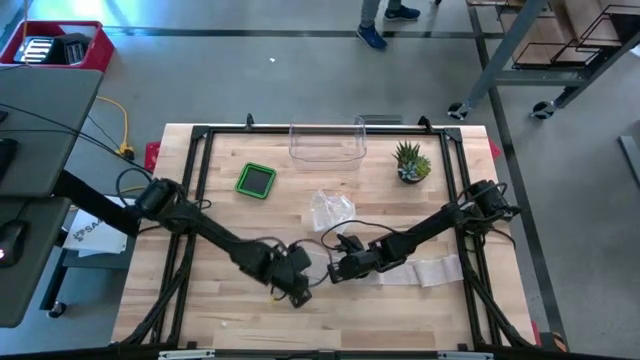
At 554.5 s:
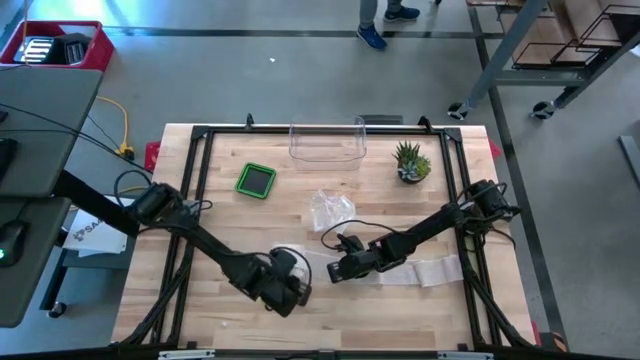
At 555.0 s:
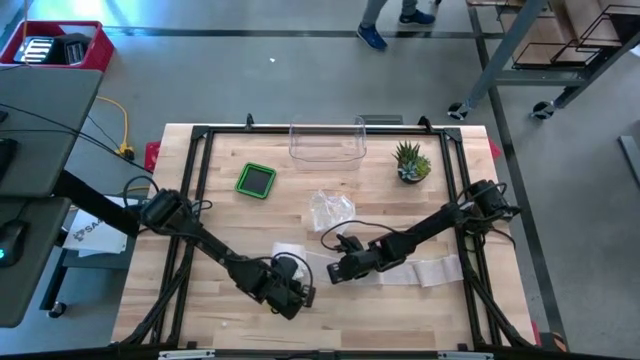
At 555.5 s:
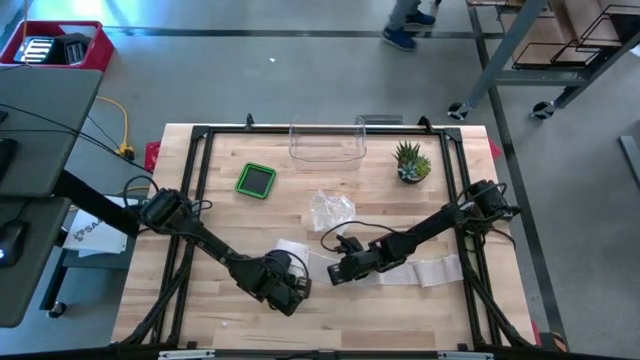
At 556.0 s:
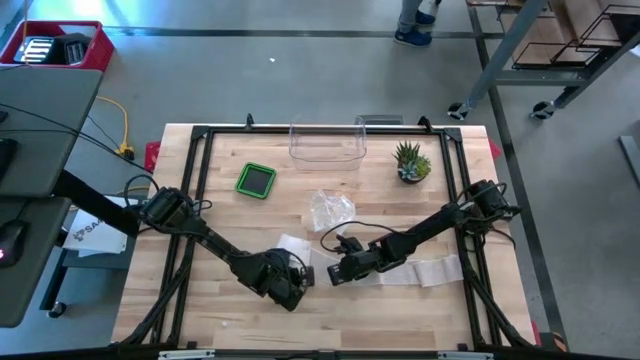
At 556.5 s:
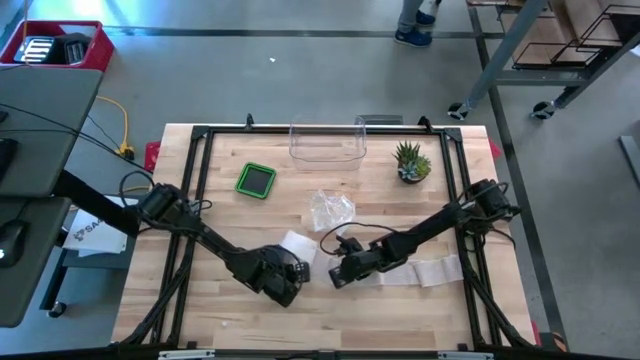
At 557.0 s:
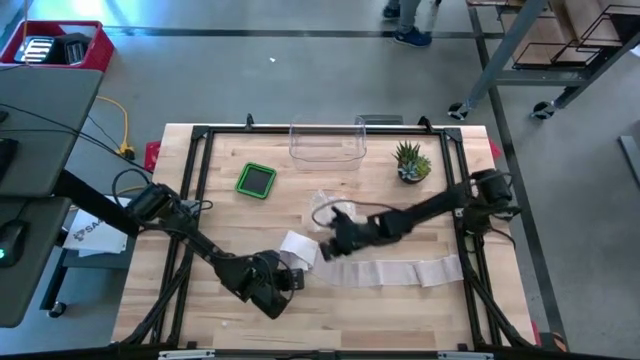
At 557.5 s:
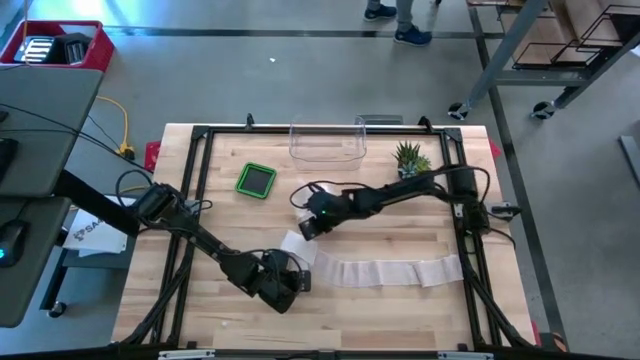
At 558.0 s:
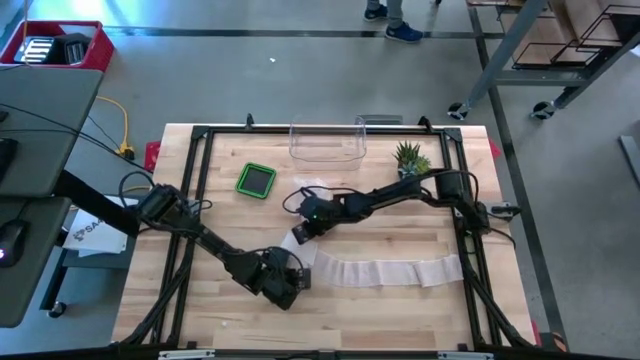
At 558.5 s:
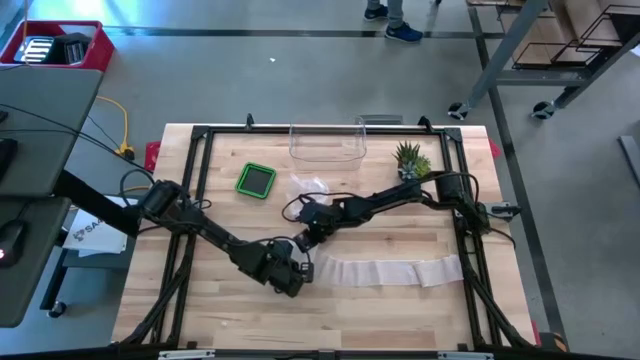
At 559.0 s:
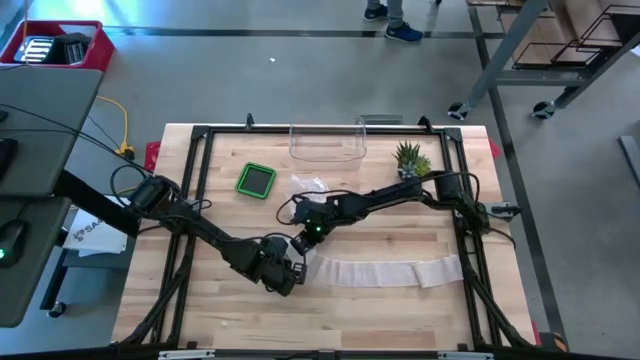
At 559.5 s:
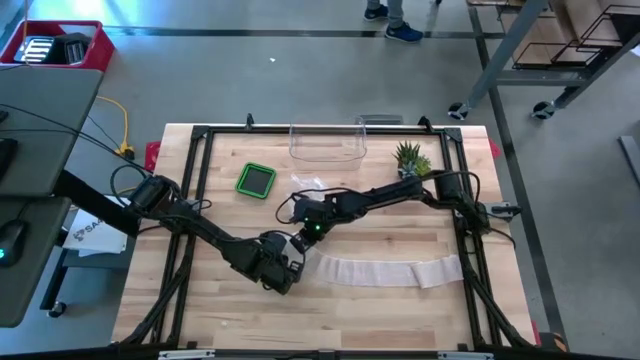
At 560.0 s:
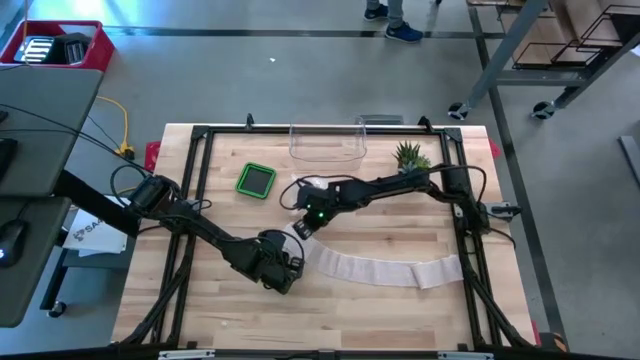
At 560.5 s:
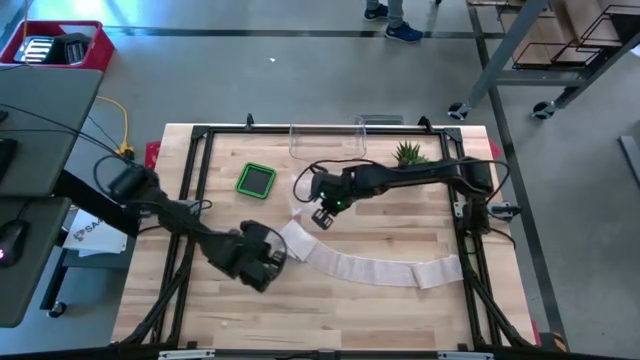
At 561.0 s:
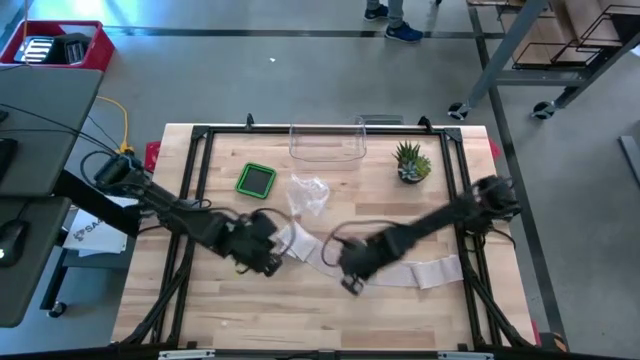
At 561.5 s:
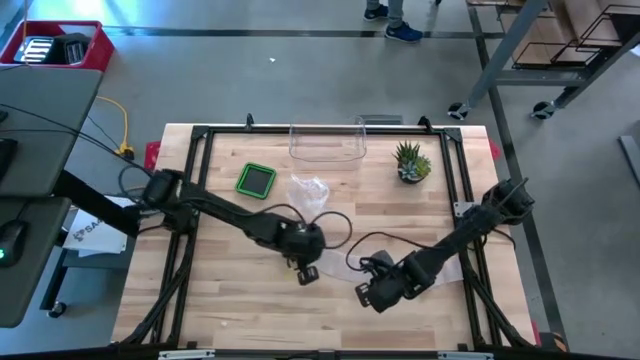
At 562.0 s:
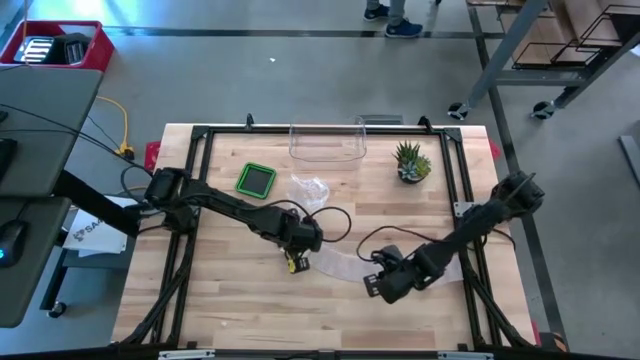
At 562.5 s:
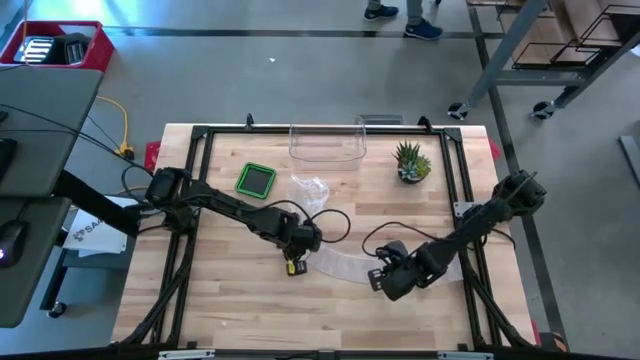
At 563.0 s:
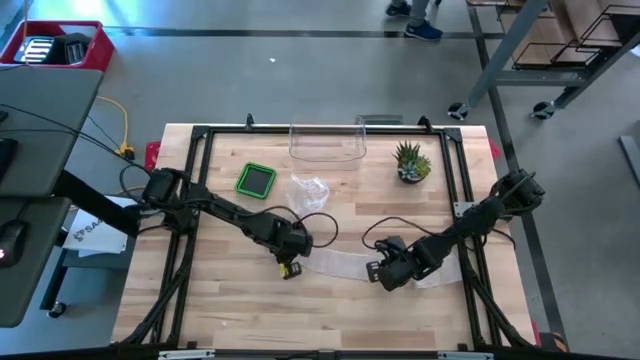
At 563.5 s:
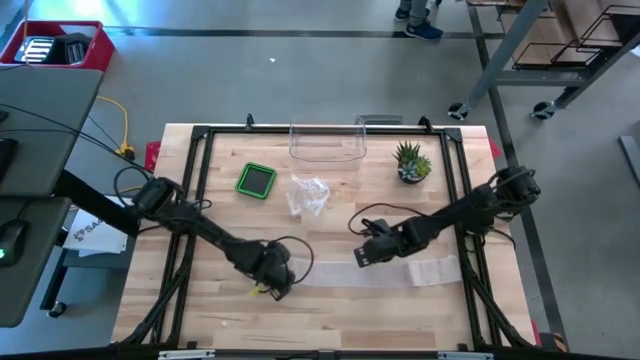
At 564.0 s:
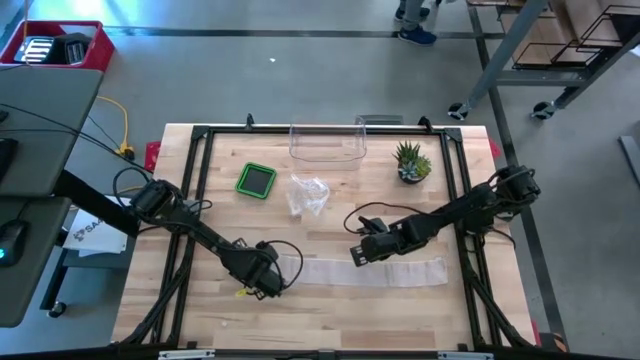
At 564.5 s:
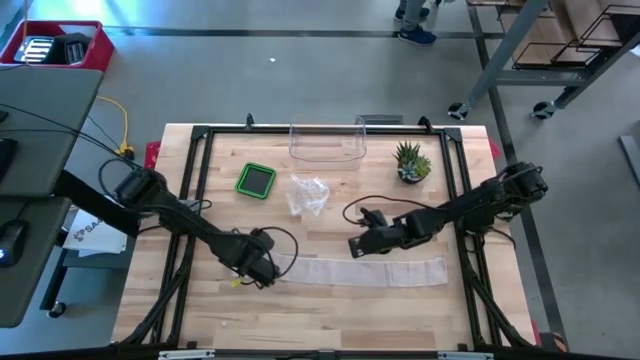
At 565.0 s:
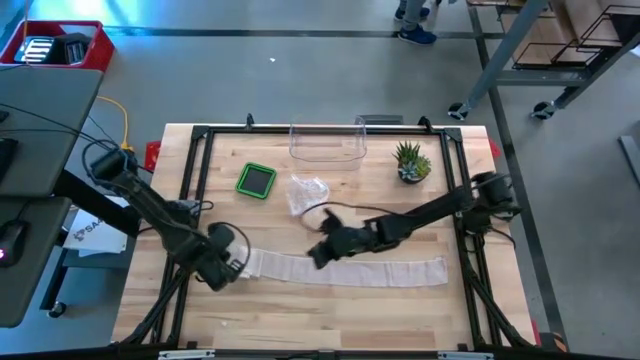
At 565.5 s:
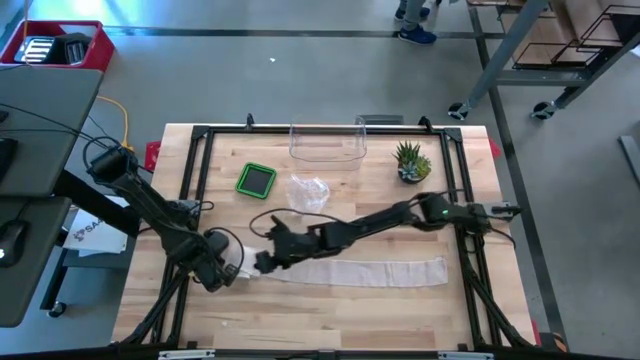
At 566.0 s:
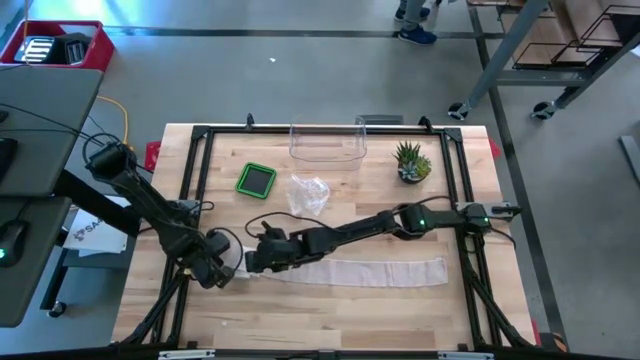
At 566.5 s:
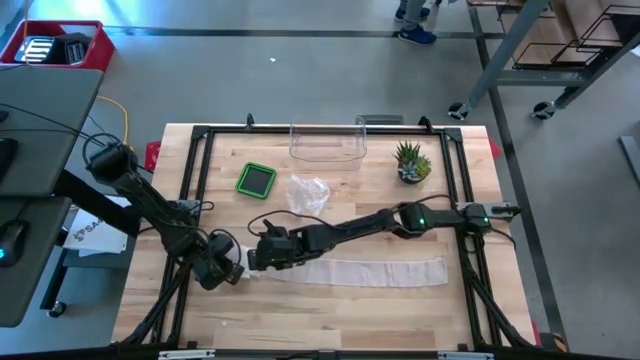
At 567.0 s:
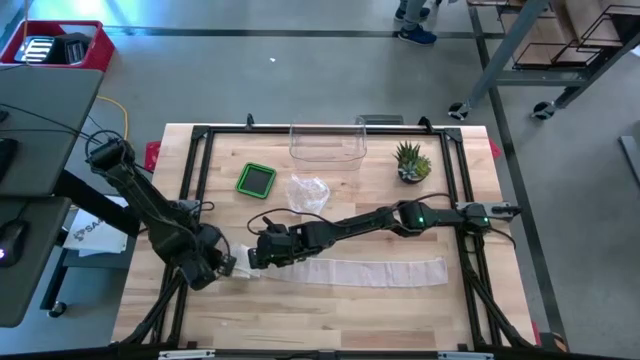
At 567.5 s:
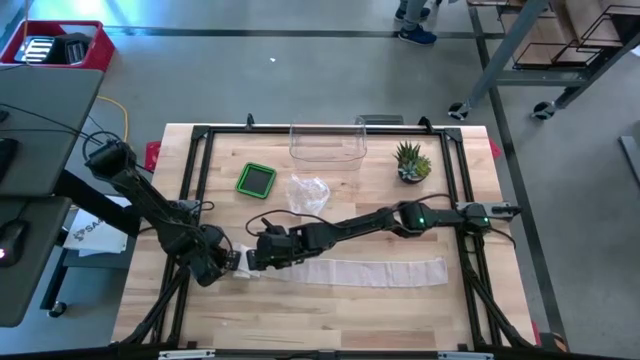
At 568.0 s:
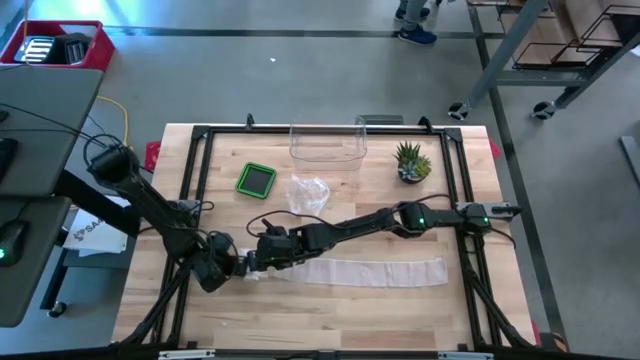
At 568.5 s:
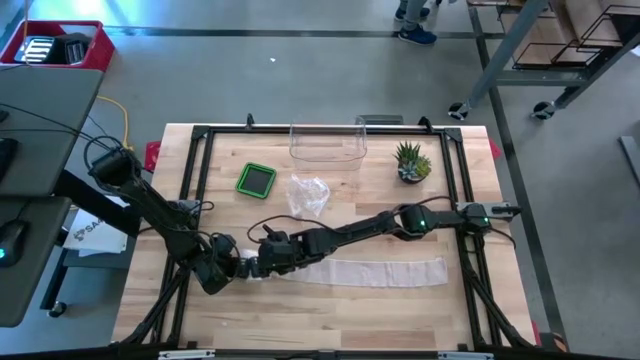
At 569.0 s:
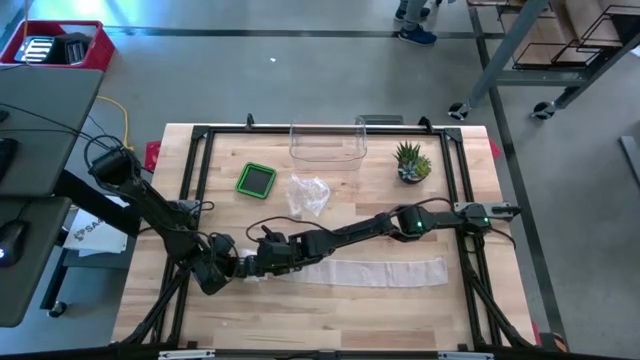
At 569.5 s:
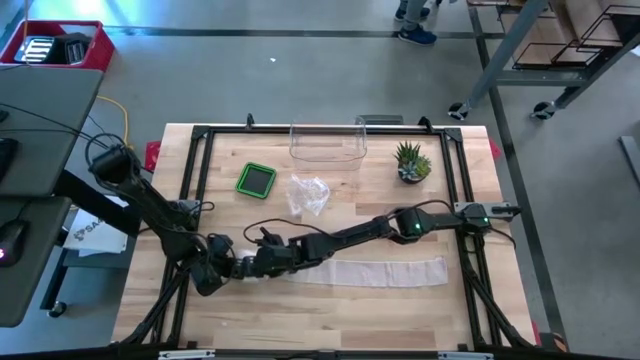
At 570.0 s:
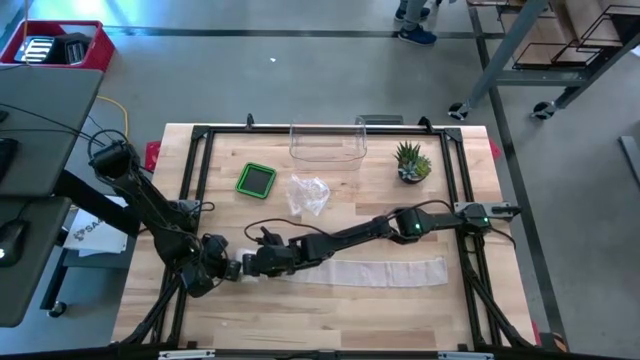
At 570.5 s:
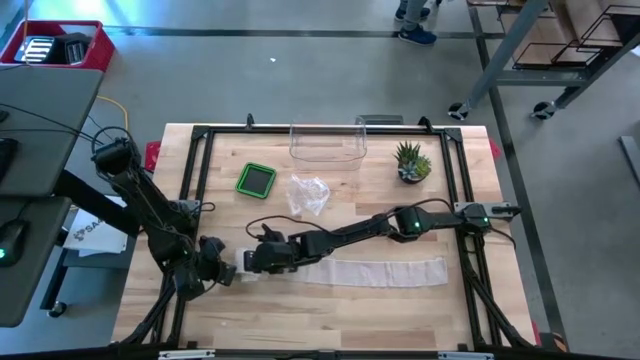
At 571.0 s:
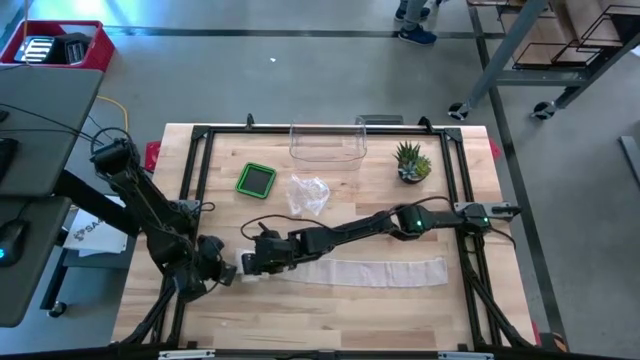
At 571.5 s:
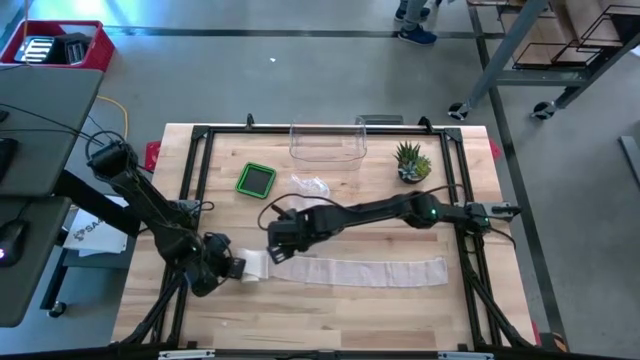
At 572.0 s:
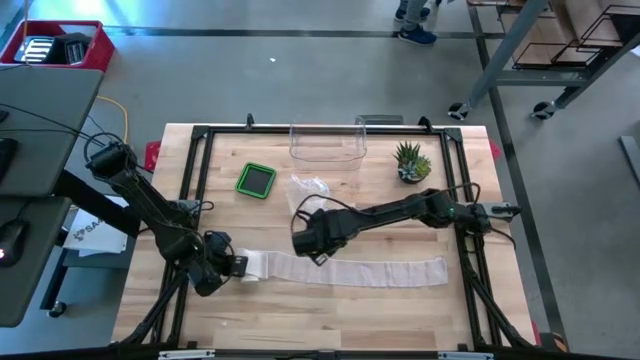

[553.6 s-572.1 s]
Task: Roll bandage
Roll the bandage

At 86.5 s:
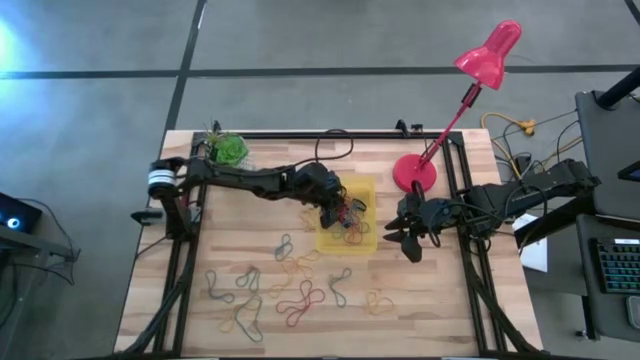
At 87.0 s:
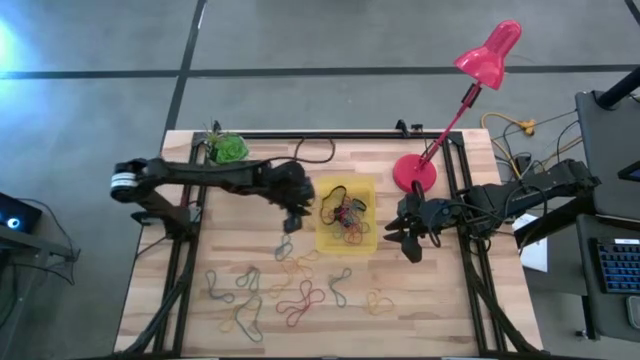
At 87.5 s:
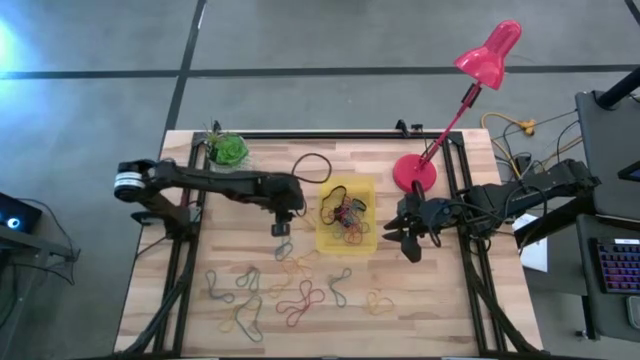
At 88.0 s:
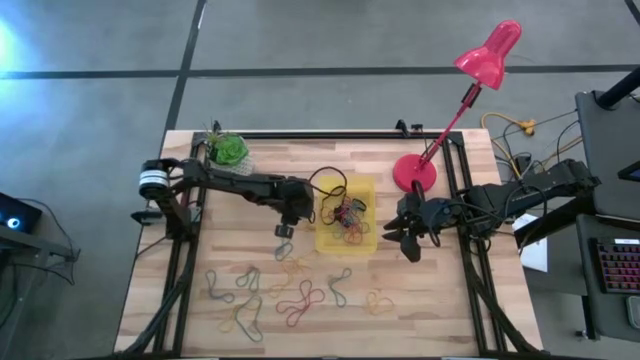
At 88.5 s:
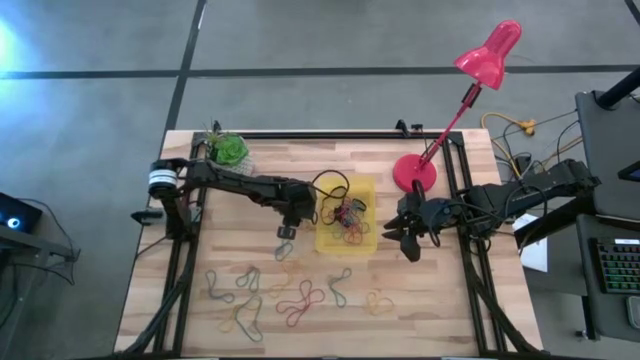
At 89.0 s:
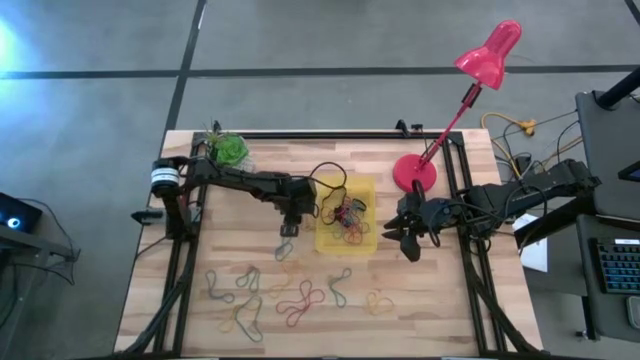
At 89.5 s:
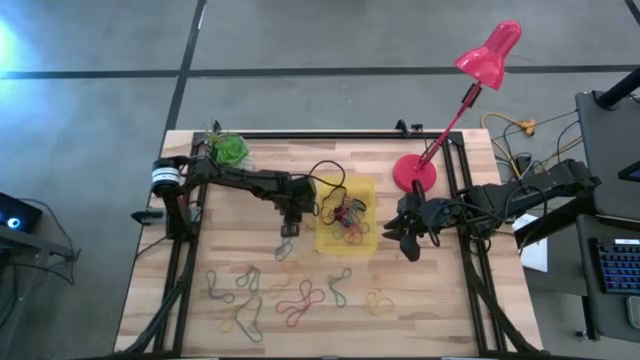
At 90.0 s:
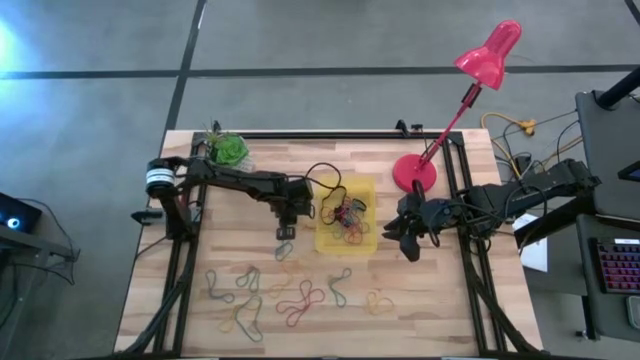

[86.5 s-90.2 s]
Task: Pick and place rubber bands into bin
Put the yellow rubber band into the bin
